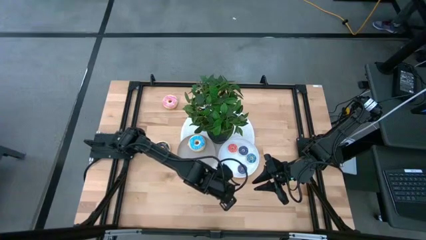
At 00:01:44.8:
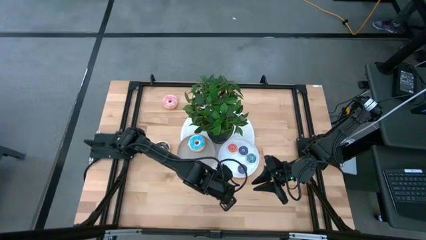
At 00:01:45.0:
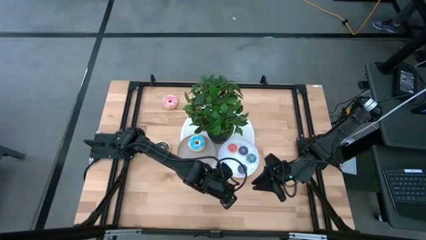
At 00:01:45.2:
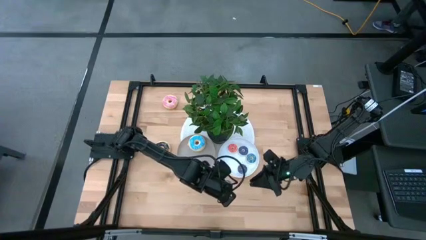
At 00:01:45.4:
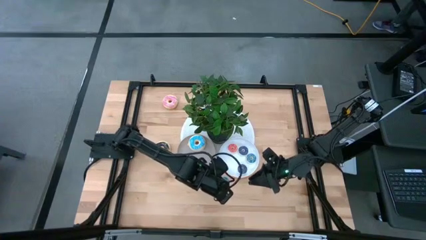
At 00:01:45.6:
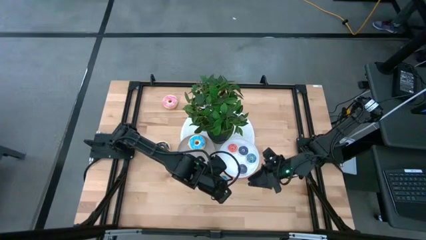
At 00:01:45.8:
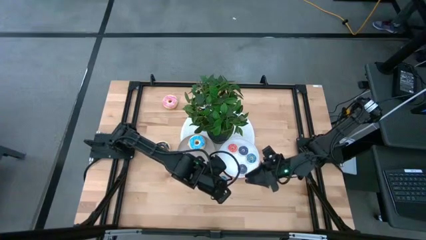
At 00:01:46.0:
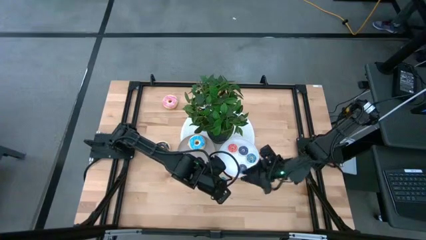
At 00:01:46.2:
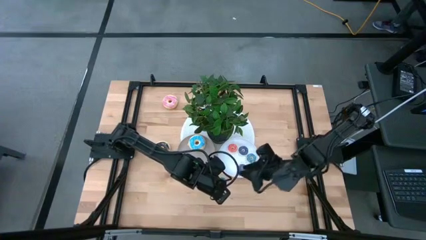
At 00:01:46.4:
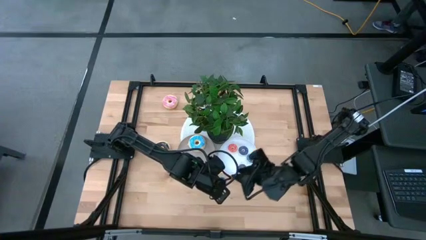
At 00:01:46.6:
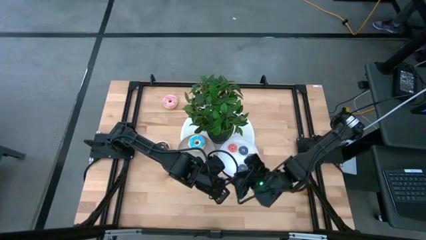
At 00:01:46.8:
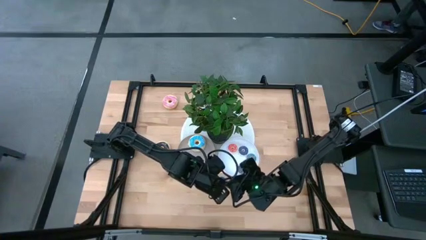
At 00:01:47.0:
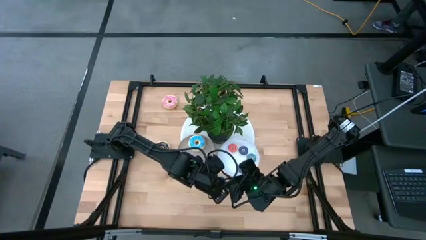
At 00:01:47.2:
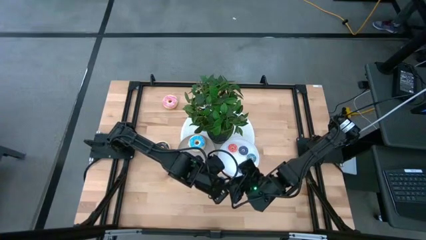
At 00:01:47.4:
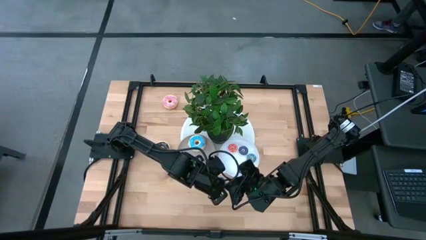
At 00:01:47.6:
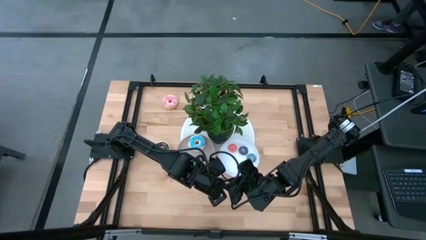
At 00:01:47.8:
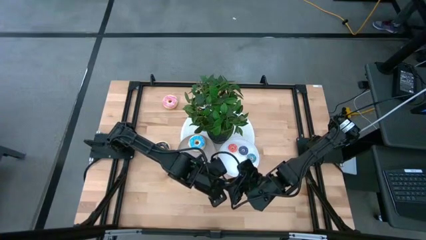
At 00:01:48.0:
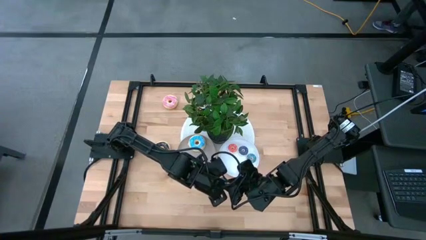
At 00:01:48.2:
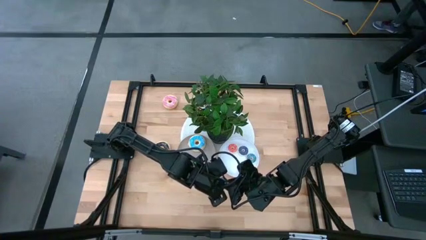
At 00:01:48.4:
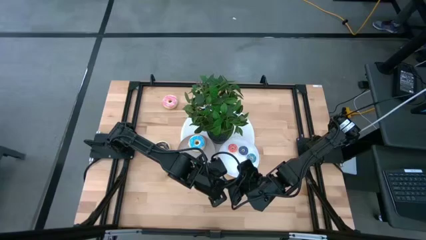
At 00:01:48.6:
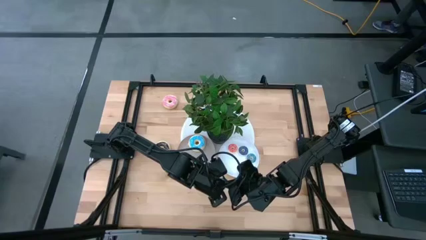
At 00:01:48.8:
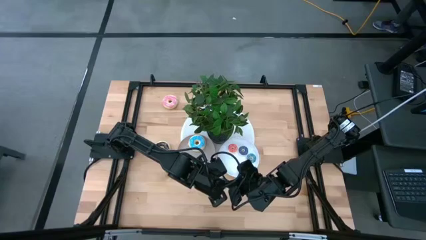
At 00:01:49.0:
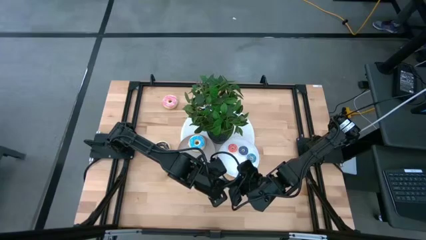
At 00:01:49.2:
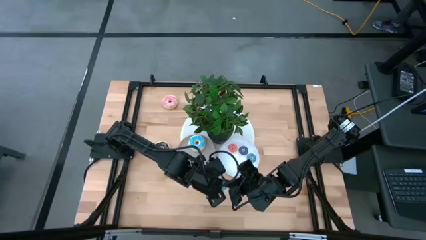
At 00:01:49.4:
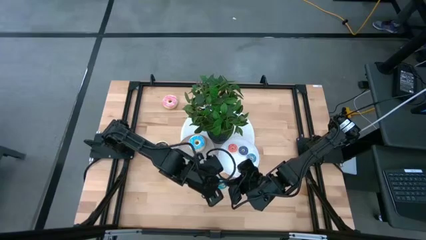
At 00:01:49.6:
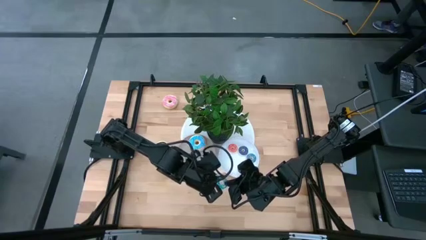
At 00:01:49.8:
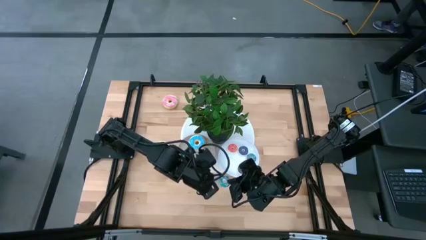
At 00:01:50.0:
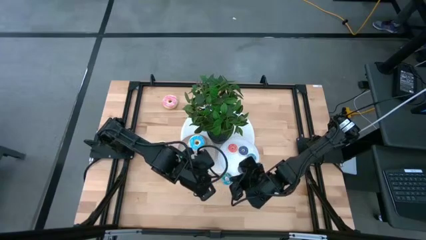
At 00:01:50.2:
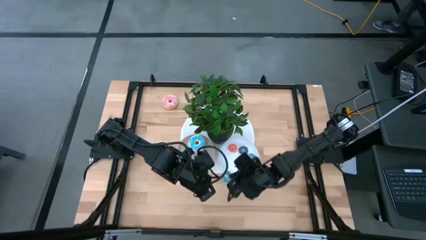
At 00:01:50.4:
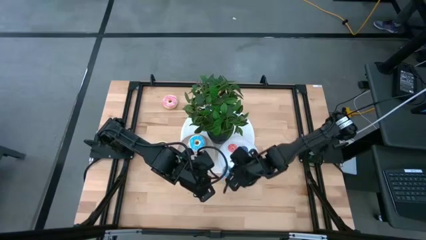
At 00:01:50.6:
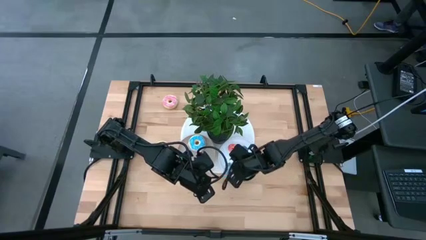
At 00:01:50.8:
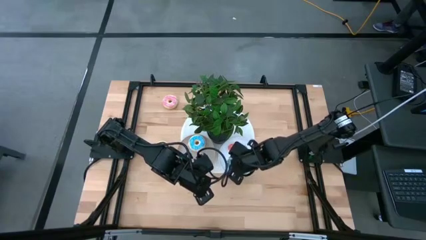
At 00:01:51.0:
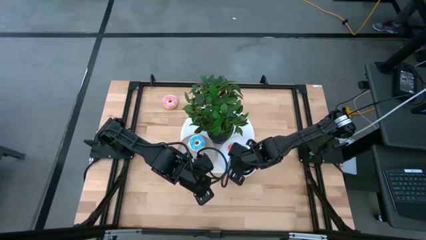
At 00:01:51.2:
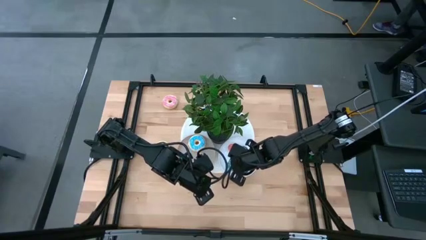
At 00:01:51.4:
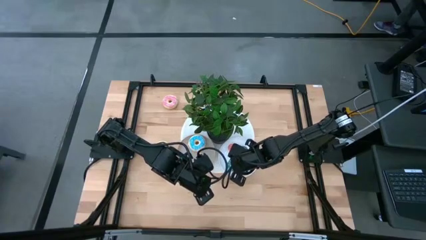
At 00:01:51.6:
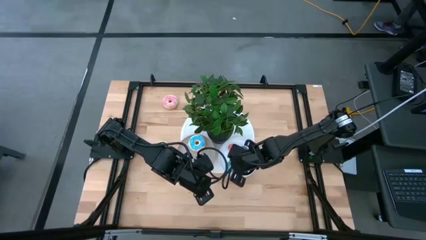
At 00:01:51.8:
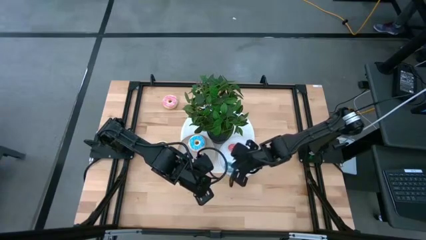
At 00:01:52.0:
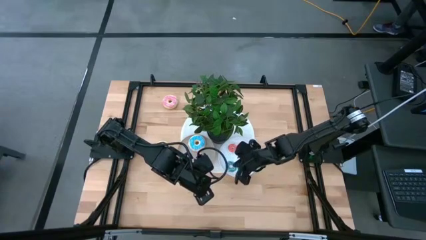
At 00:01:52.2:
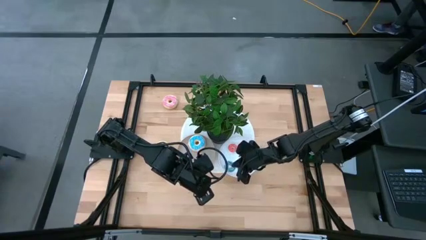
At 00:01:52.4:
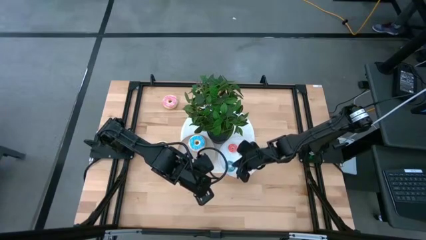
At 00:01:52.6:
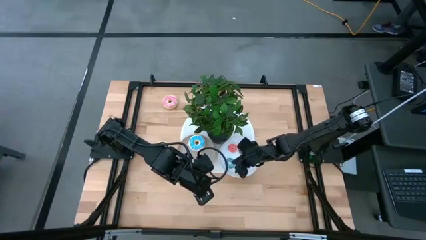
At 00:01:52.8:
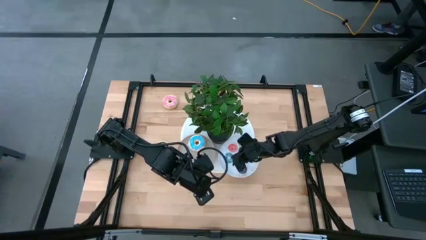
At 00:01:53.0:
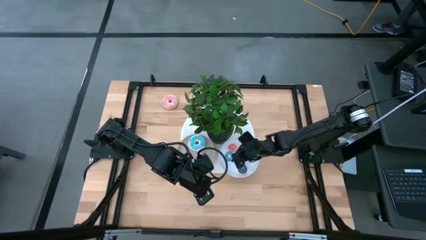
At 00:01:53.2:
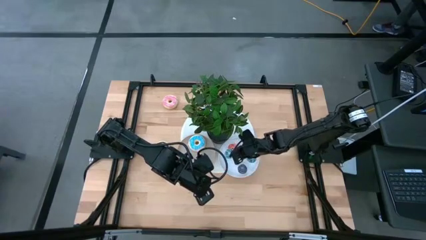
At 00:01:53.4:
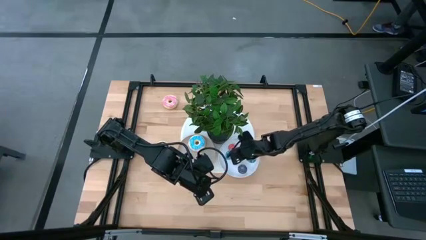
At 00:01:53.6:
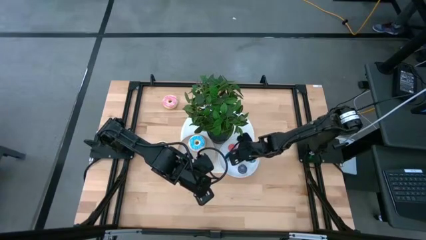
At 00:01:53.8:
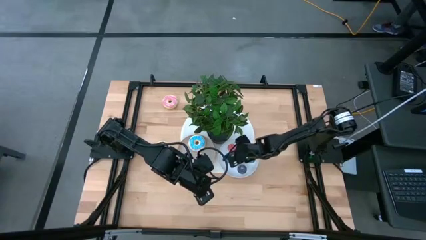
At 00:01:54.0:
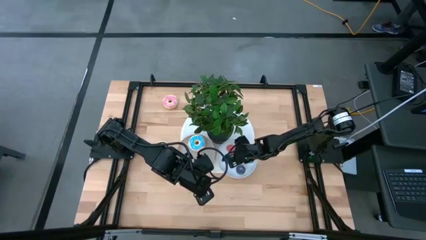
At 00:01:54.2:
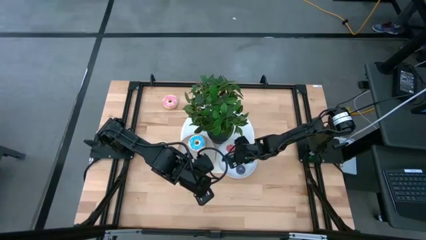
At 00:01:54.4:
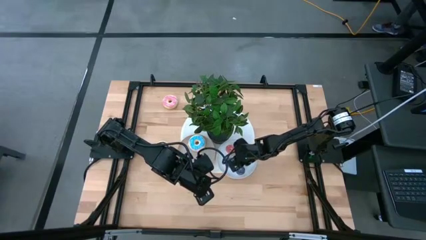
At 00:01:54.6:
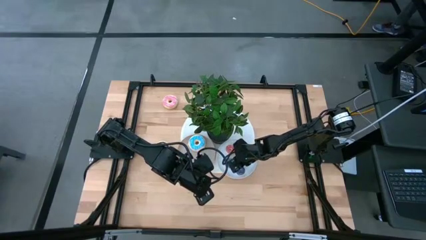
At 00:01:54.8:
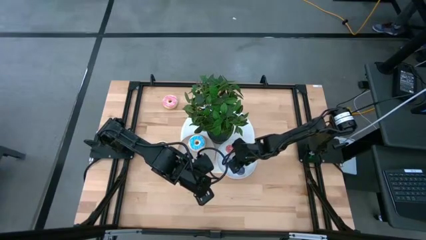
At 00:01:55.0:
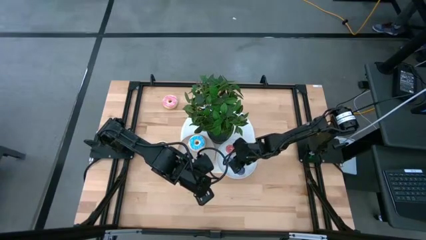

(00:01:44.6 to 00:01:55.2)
Task: Pick & Place donuts
Put the small blue donut on the white plate

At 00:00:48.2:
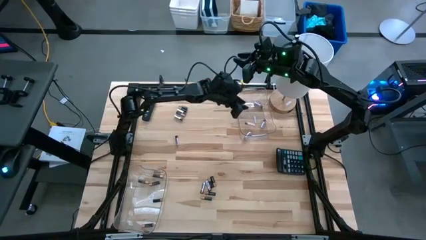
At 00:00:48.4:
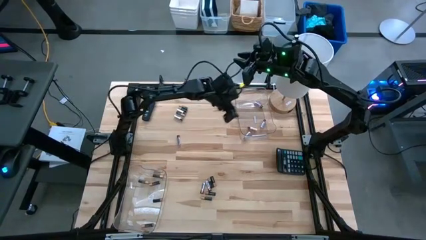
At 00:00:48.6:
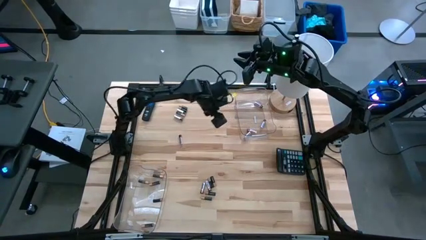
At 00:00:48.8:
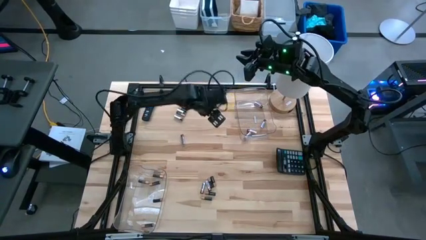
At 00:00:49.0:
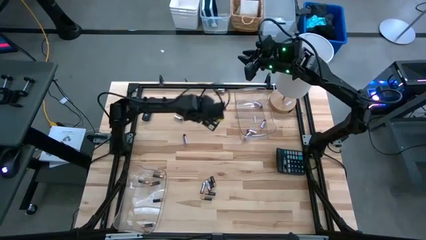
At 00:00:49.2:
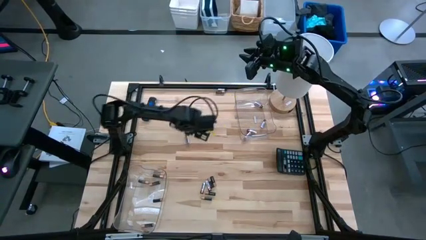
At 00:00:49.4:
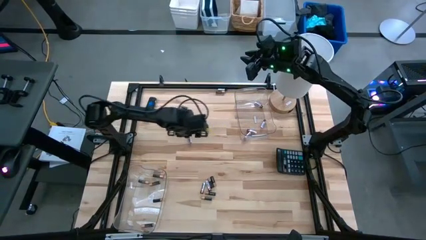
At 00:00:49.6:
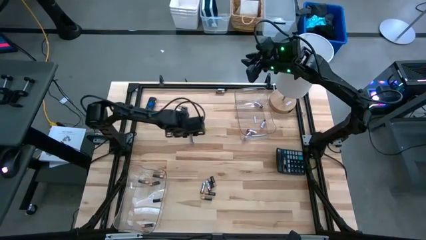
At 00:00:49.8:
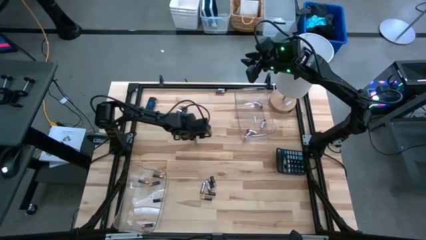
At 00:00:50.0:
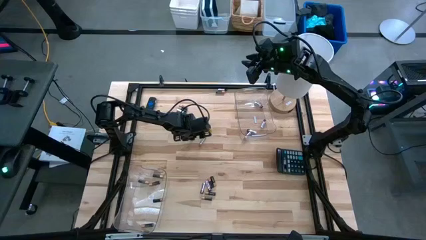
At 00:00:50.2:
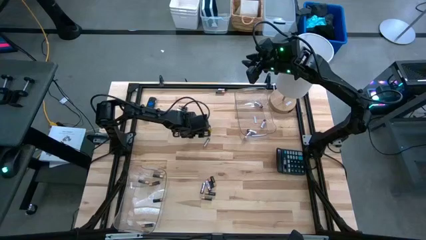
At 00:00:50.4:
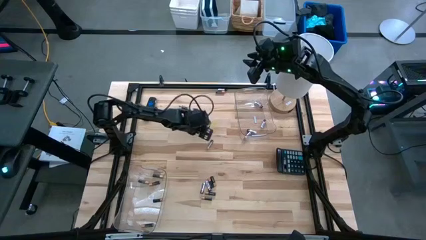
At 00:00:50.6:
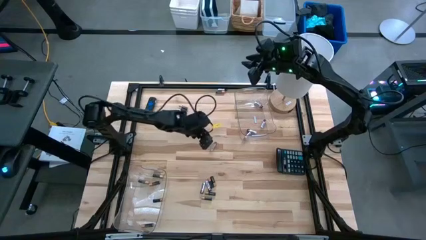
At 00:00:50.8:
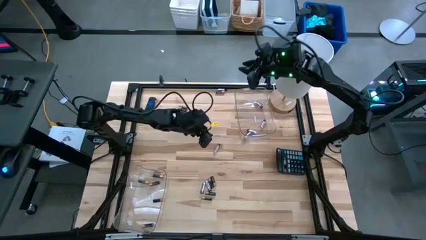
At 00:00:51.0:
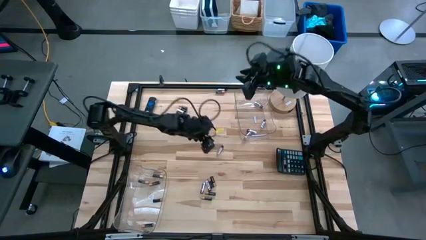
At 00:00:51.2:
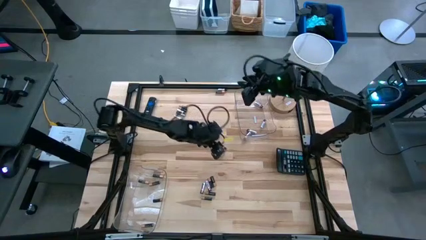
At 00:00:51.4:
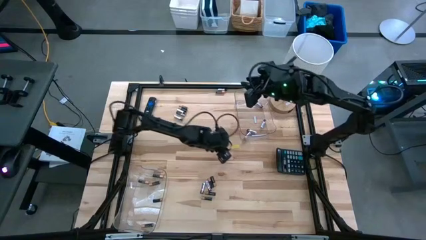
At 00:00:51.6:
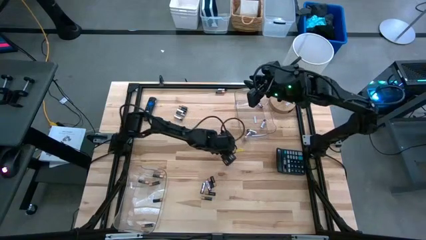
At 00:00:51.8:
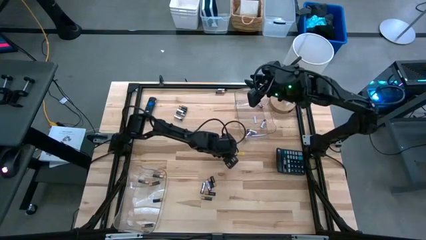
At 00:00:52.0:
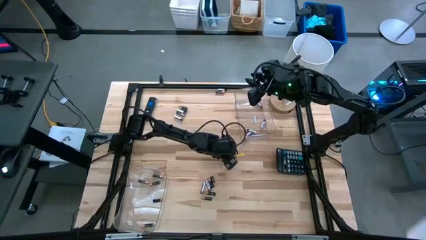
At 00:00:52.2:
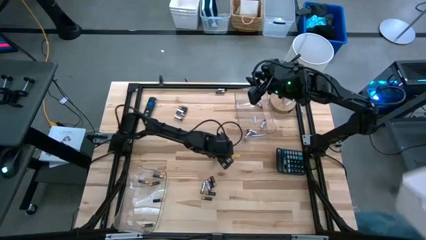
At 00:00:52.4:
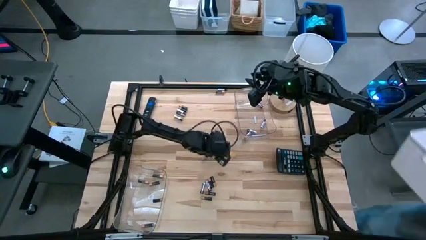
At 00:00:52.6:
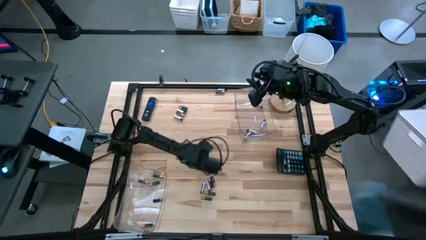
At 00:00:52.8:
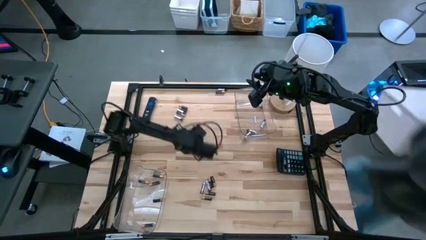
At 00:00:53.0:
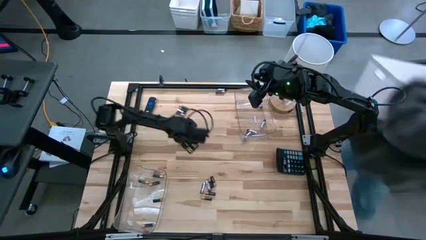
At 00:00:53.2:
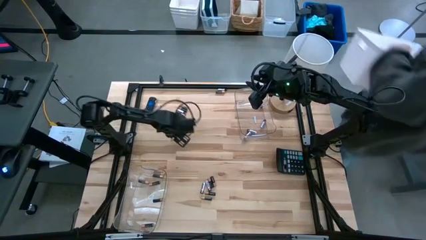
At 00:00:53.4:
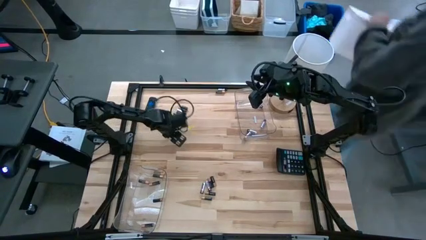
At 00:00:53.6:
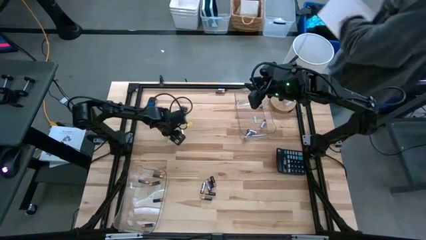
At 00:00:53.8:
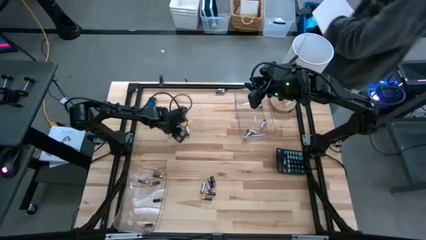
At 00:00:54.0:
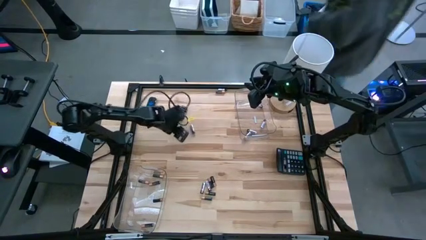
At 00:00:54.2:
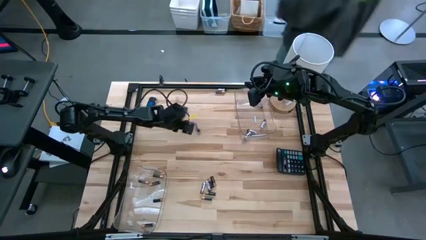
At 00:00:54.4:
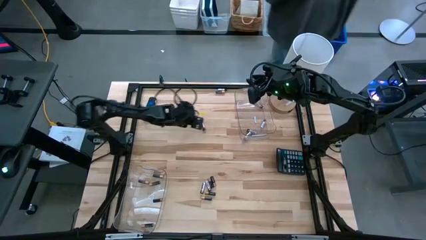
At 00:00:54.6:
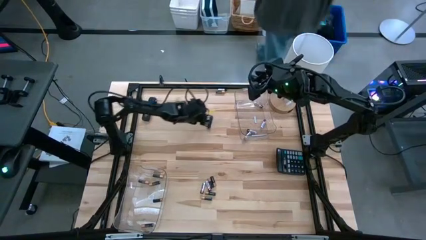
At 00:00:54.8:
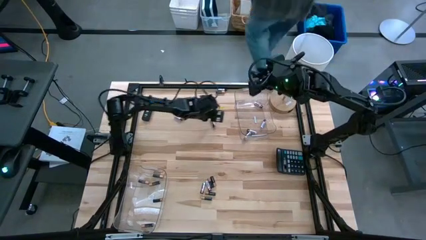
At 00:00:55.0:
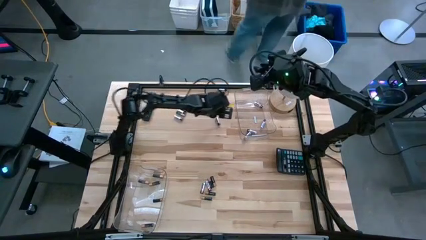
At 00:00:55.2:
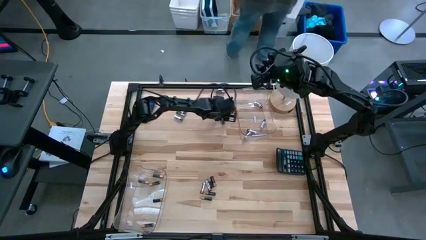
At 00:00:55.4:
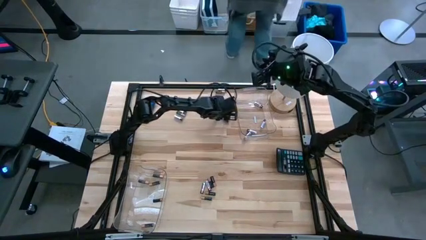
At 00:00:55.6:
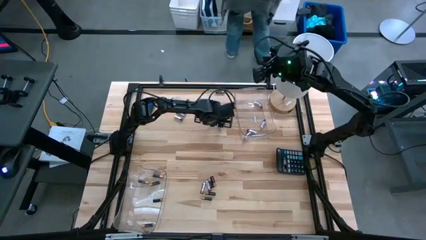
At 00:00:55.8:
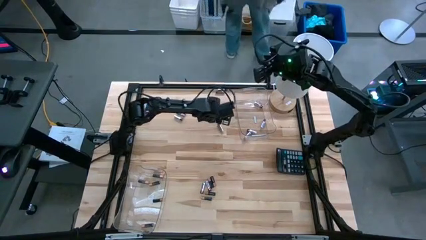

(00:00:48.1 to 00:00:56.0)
Task: Sort batteries
Put the silver battery into the right transparent bin
